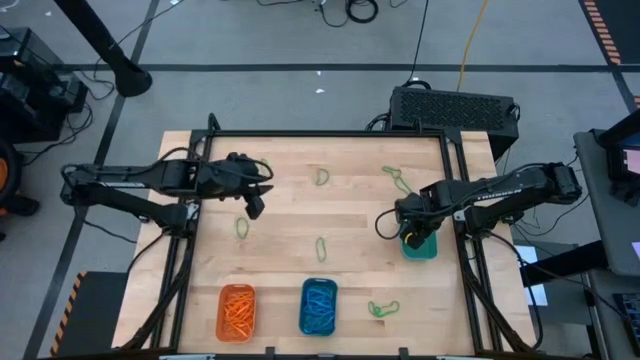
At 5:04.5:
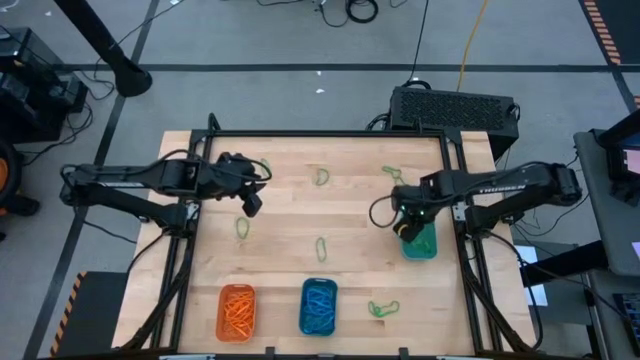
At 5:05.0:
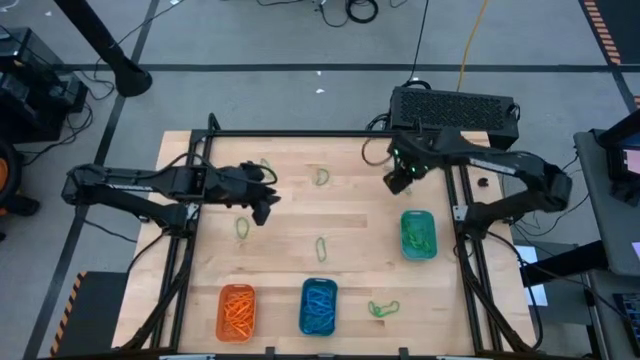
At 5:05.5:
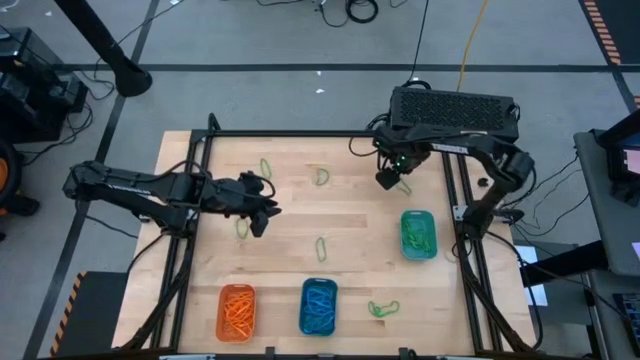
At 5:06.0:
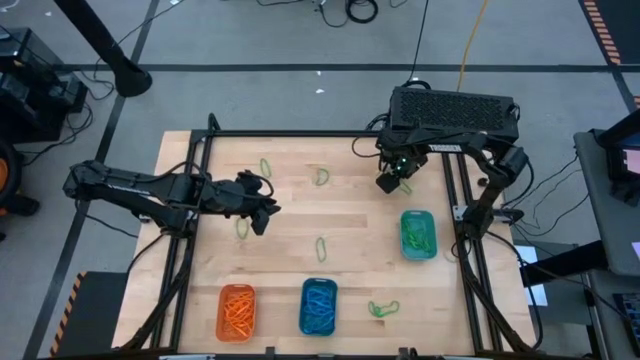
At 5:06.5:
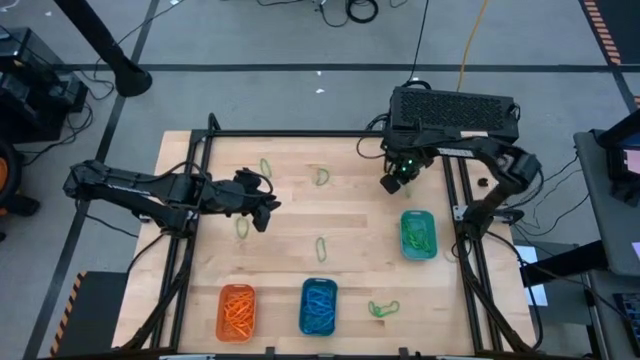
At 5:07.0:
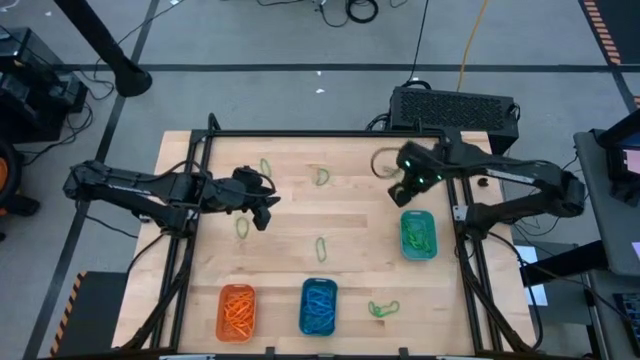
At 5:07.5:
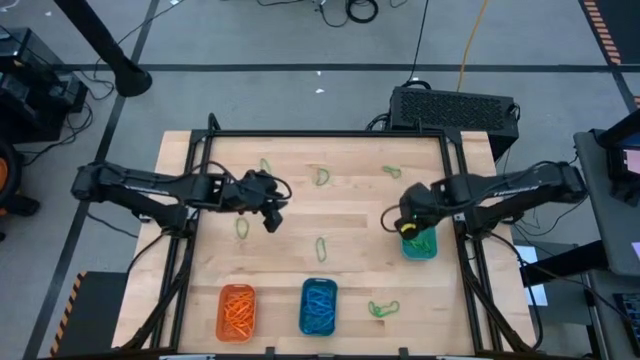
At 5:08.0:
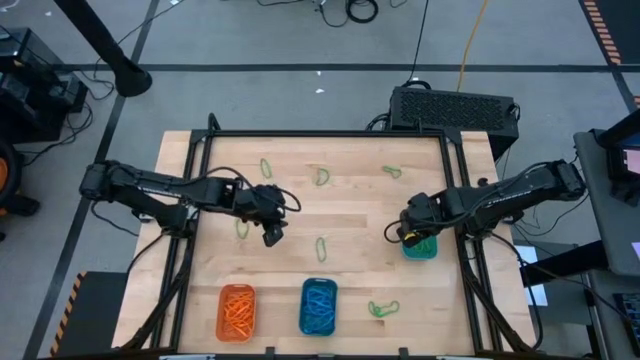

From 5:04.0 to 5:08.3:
Task: Sort rubber bands into baskets
Put the green rubber band into the green bin

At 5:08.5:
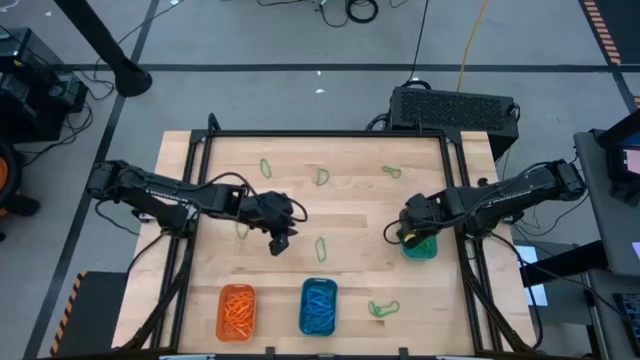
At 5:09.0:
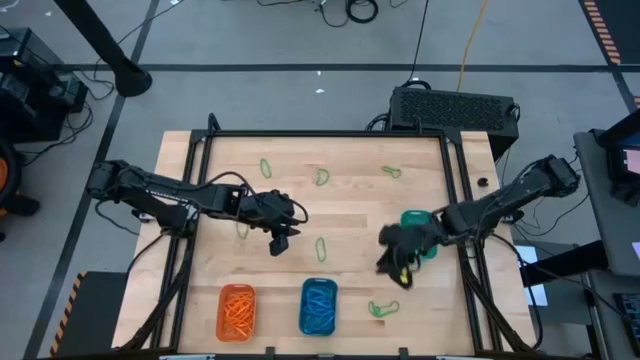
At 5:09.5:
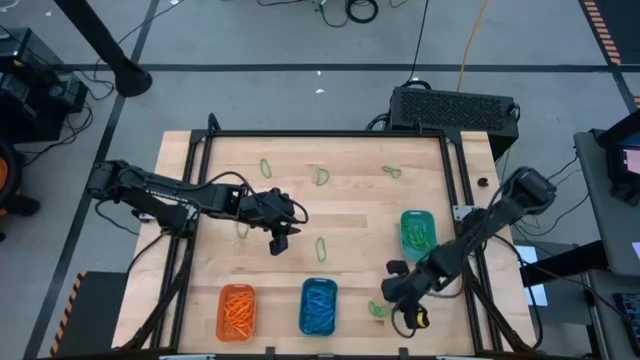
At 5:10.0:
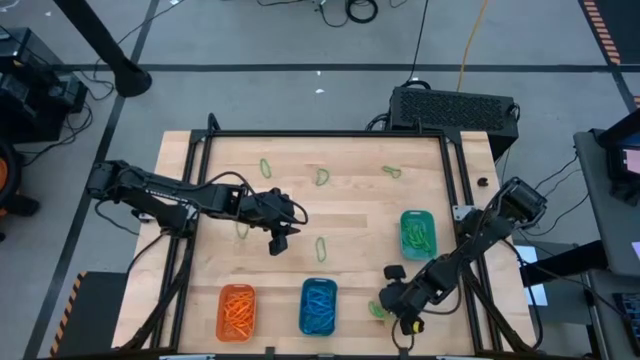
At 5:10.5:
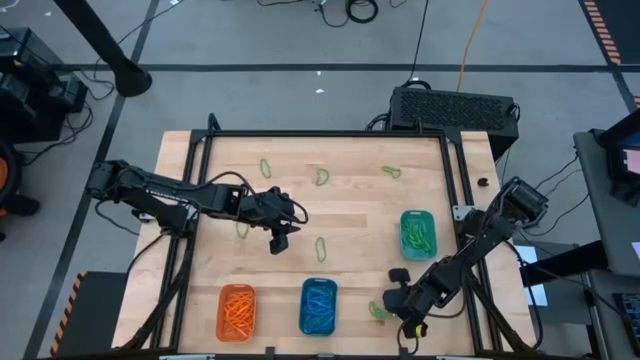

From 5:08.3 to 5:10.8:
Put the green rubber band into the green bin

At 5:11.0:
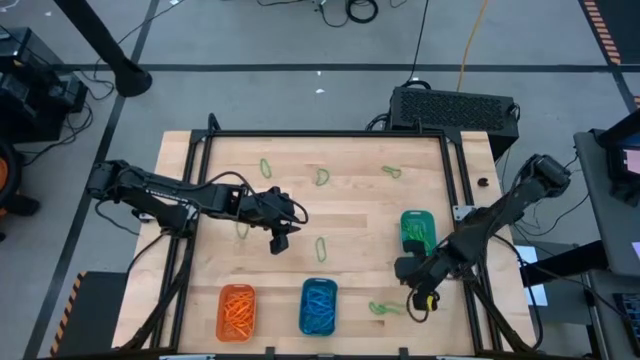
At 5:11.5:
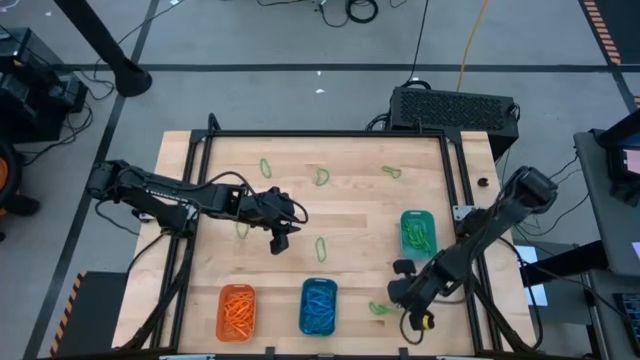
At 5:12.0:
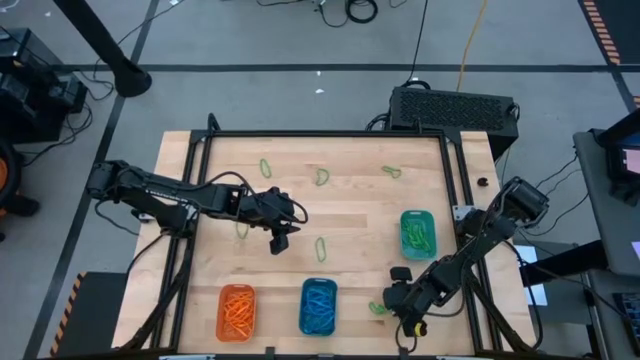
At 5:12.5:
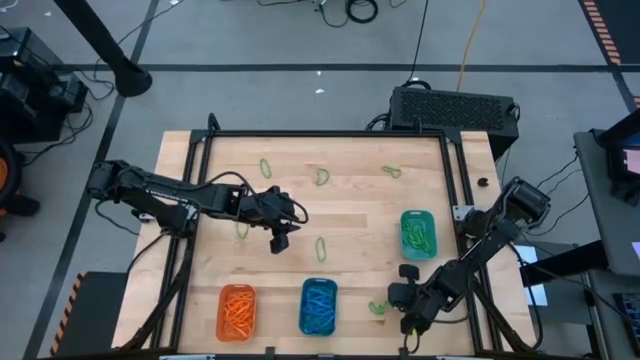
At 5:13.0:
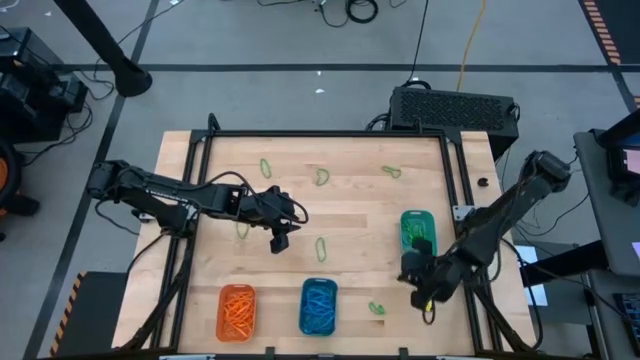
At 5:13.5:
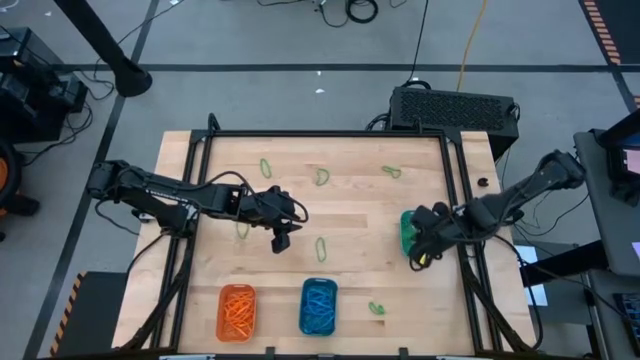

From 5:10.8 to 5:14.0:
Put the green rubber band into the green bin

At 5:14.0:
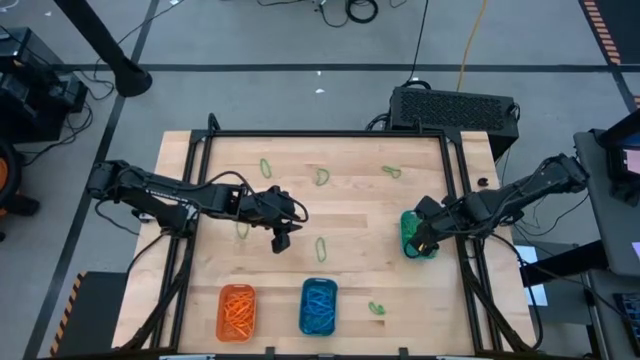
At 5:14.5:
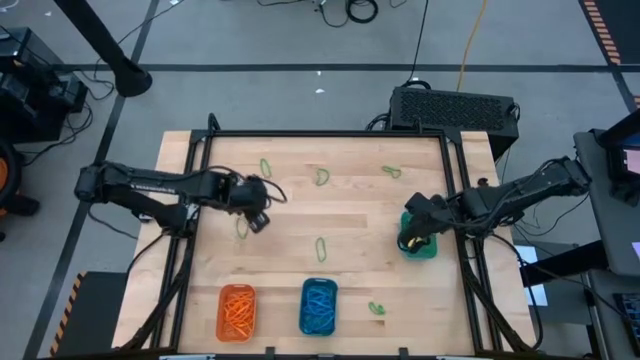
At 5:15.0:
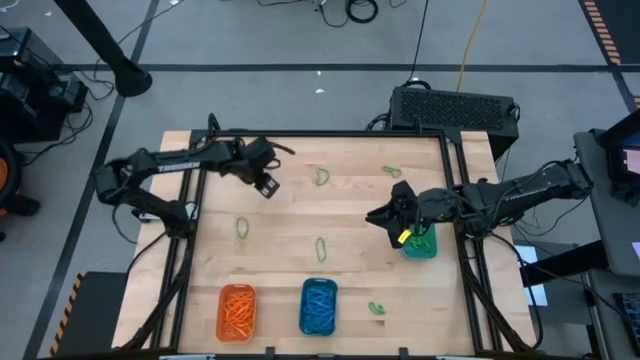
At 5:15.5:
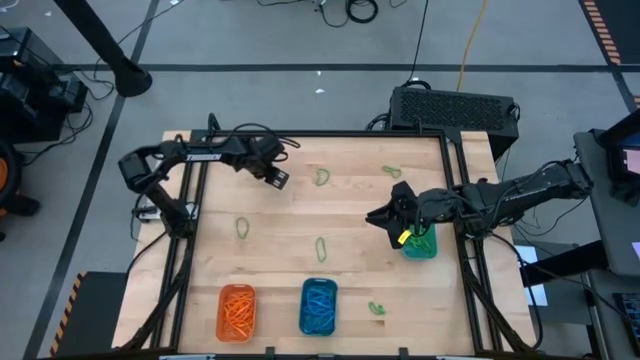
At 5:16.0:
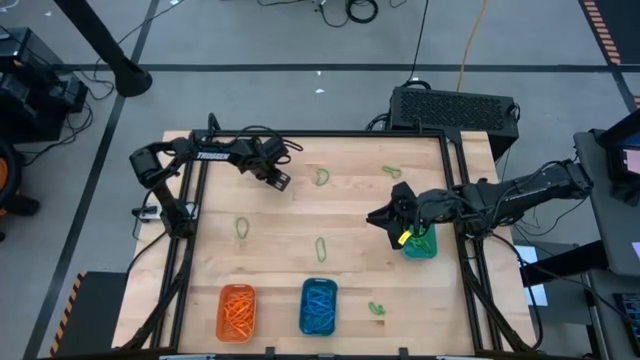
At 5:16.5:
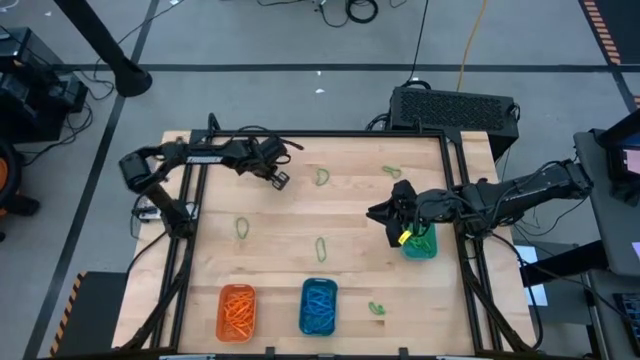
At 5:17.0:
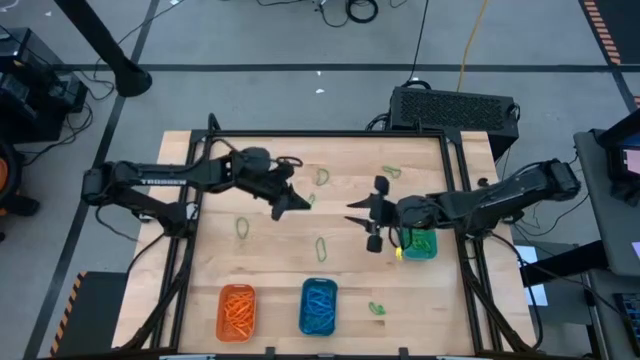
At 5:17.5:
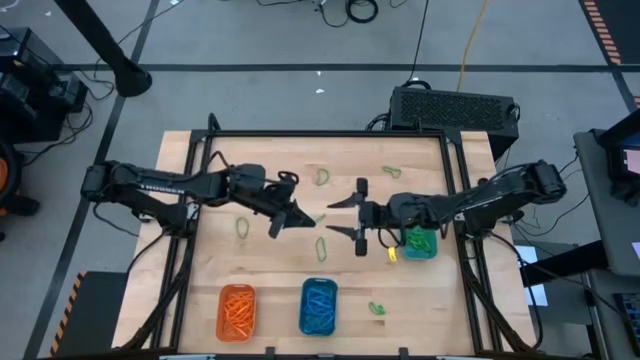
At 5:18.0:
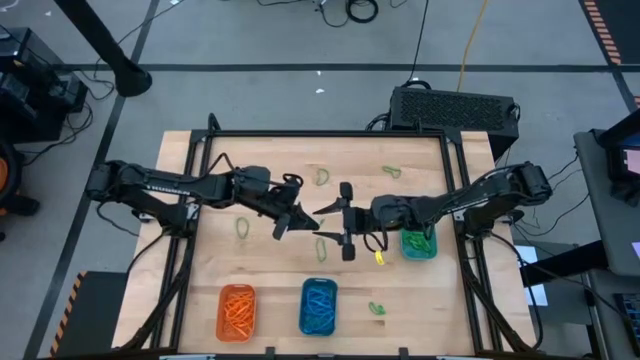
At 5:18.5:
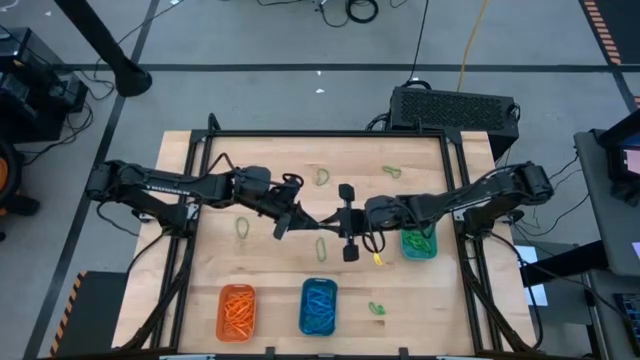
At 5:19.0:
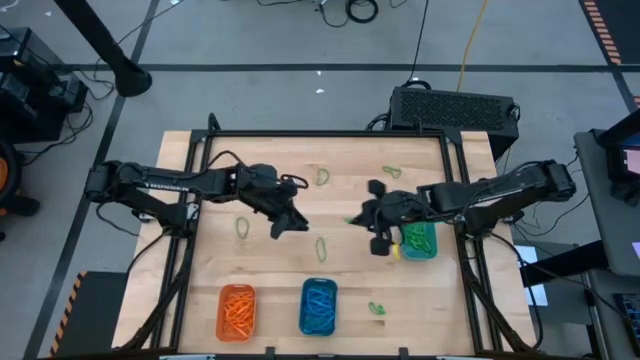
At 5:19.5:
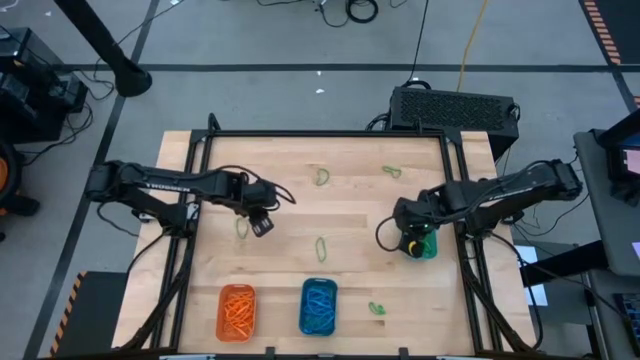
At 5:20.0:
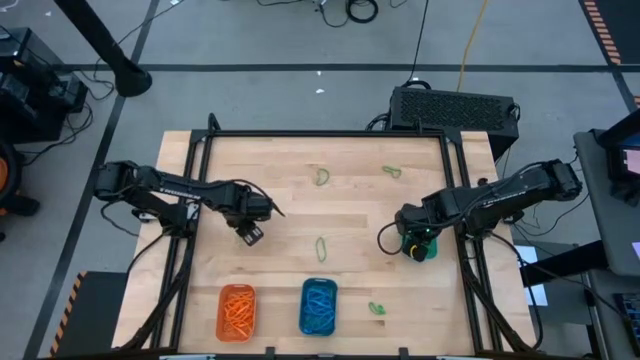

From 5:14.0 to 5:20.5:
Put the green rubber band into the green bin

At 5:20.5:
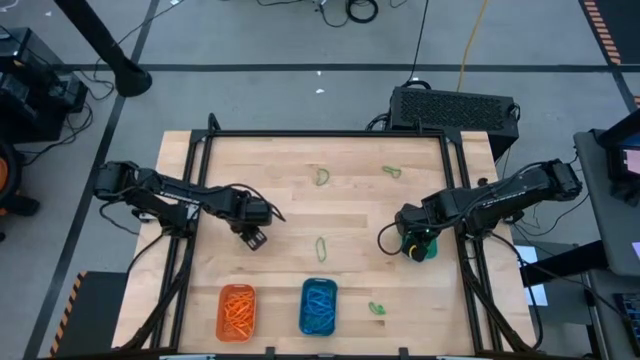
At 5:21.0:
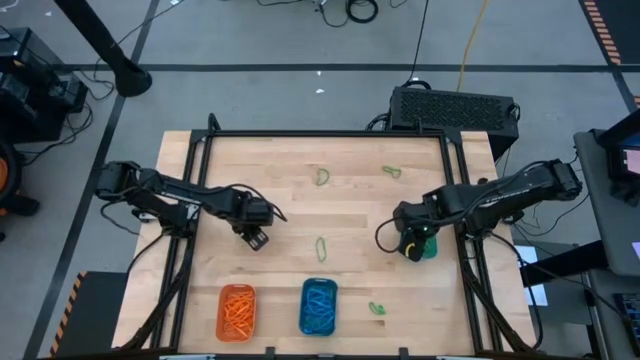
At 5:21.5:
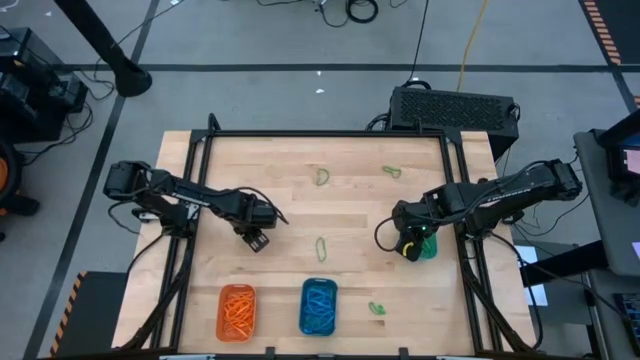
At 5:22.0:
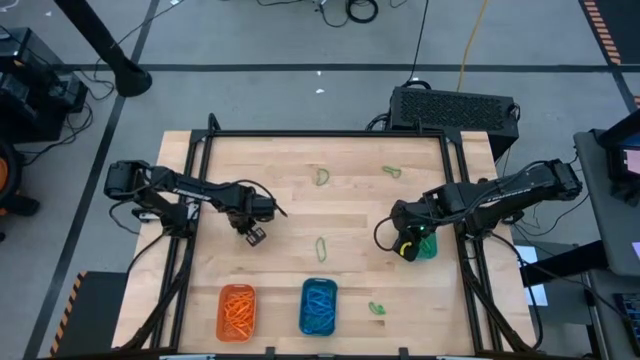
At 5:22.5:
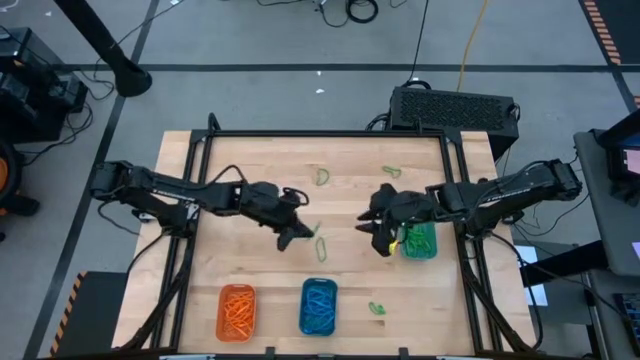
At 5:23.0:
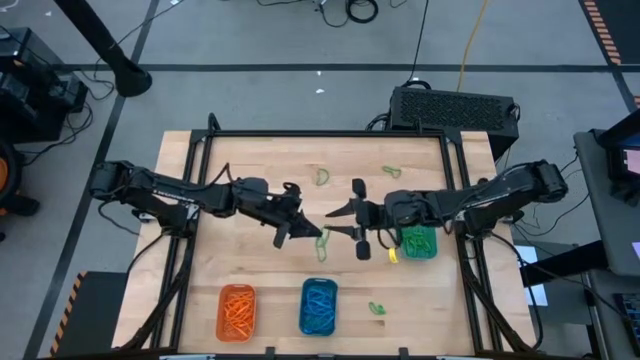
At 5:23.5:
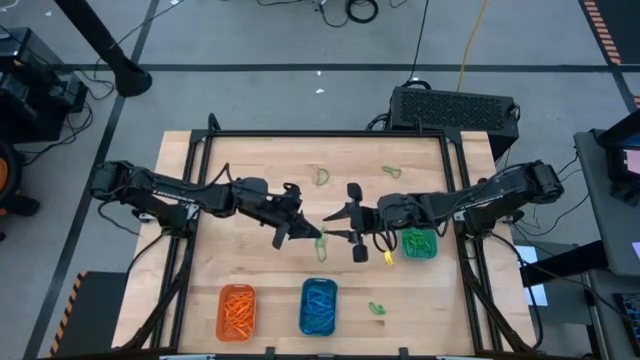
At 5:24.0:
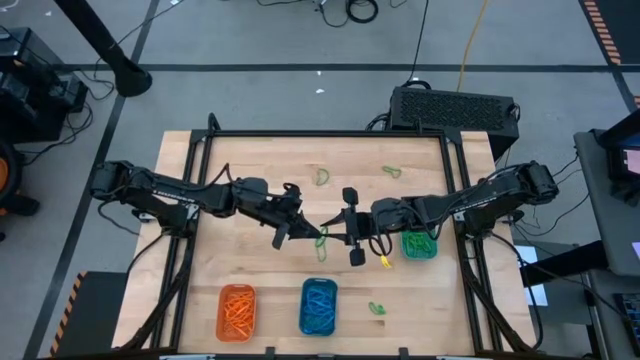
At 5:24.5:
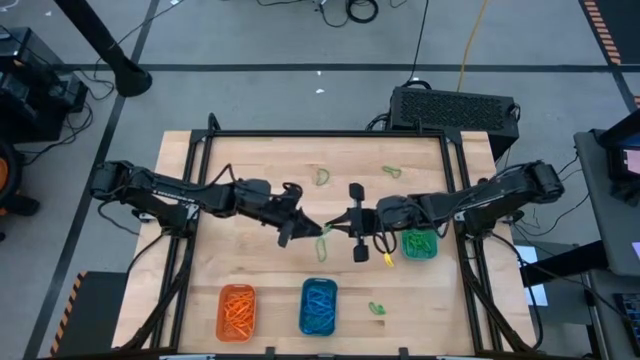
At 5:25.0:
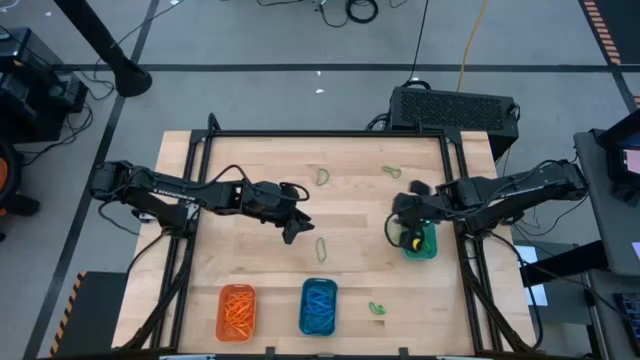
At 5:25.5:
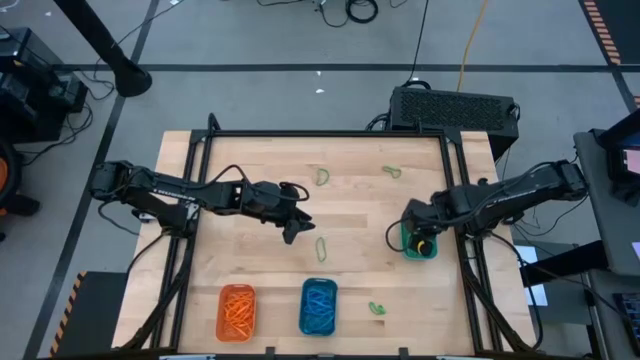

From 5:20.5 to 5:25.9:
Put the green rubber band into the green bin
